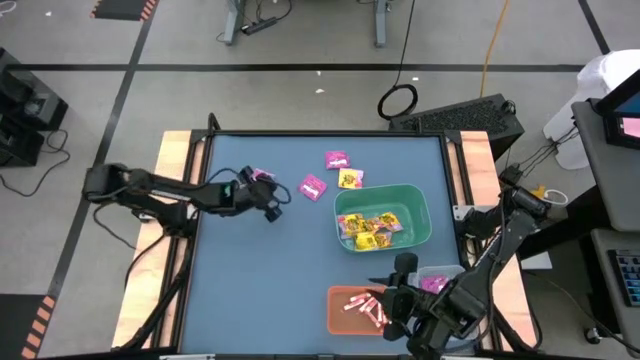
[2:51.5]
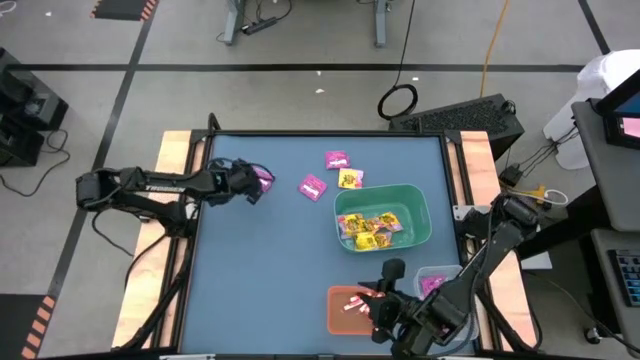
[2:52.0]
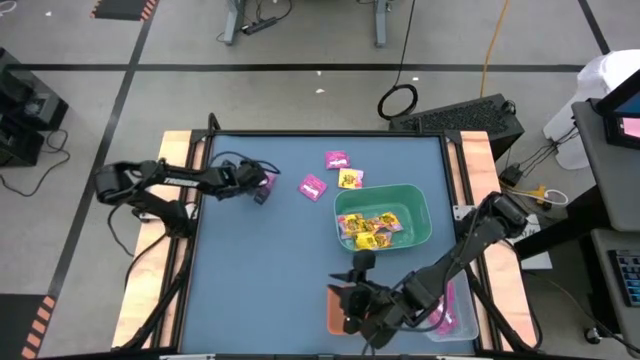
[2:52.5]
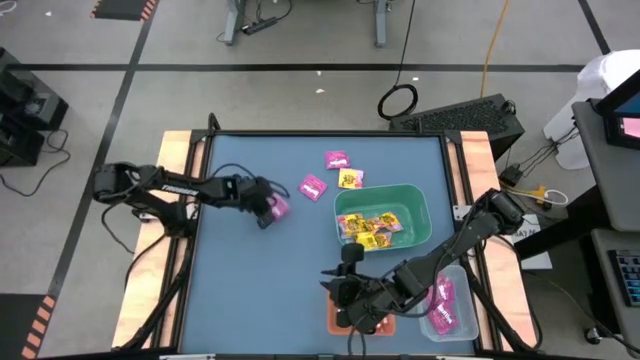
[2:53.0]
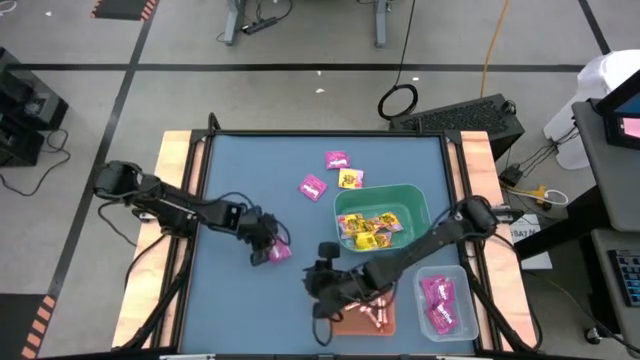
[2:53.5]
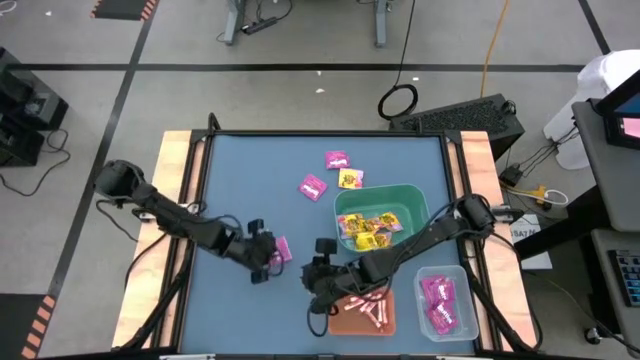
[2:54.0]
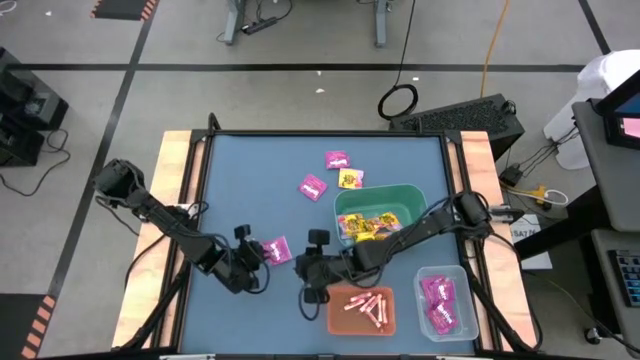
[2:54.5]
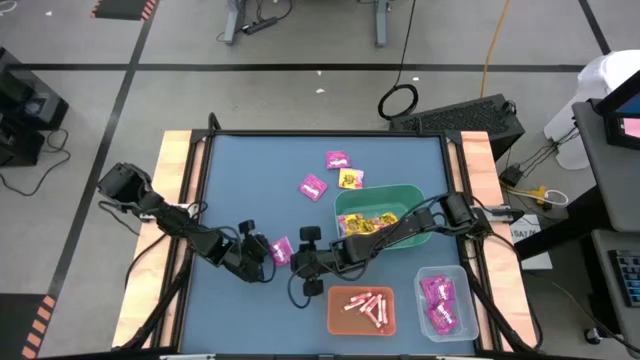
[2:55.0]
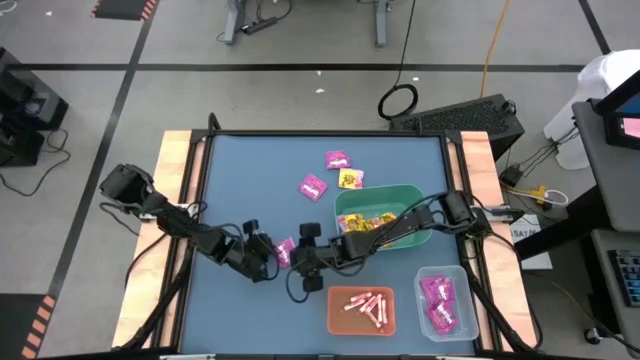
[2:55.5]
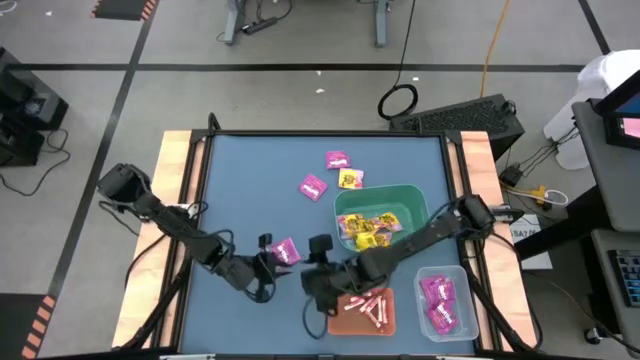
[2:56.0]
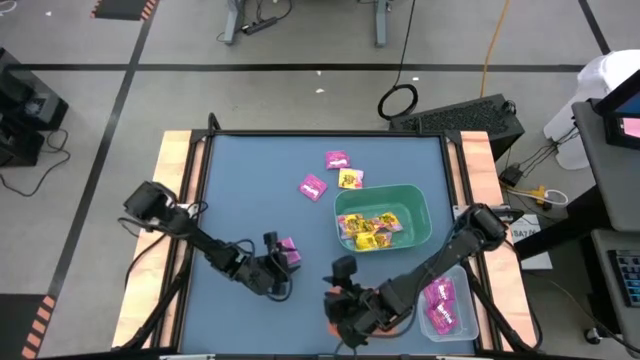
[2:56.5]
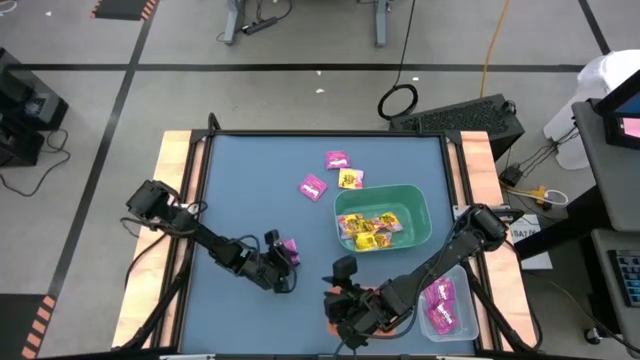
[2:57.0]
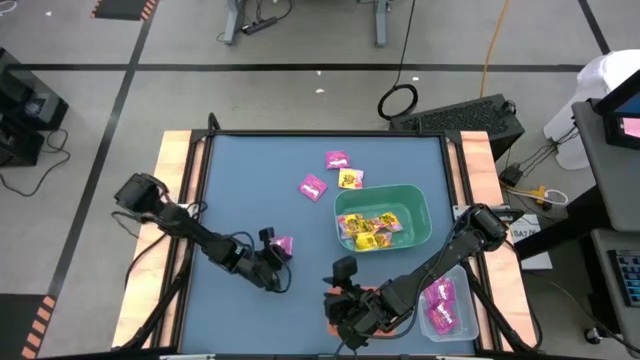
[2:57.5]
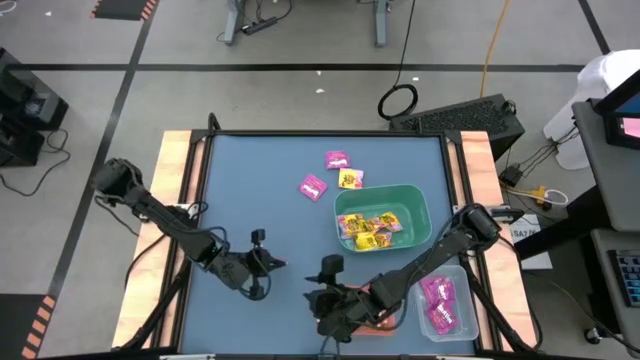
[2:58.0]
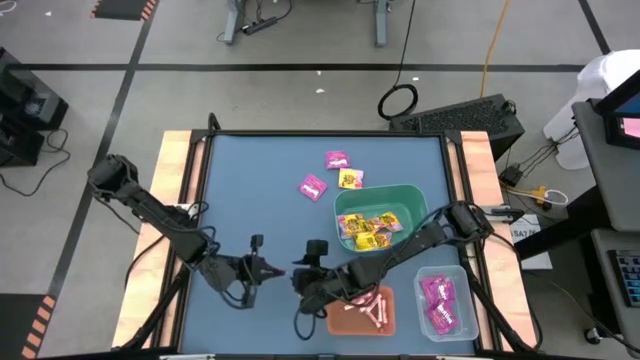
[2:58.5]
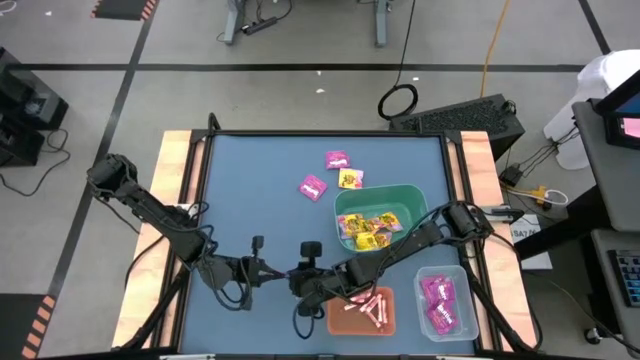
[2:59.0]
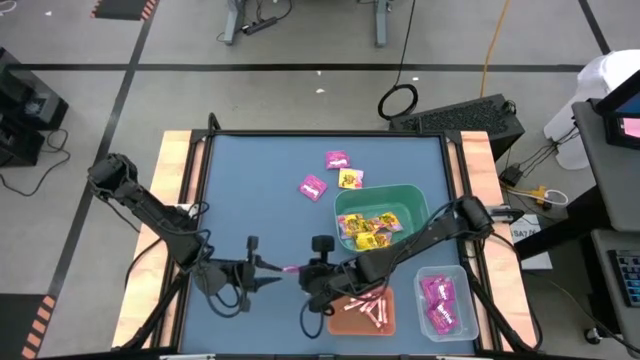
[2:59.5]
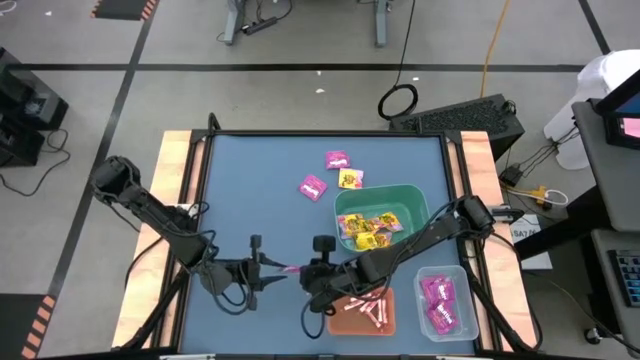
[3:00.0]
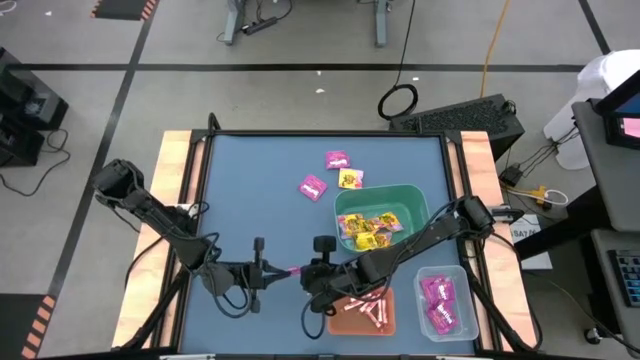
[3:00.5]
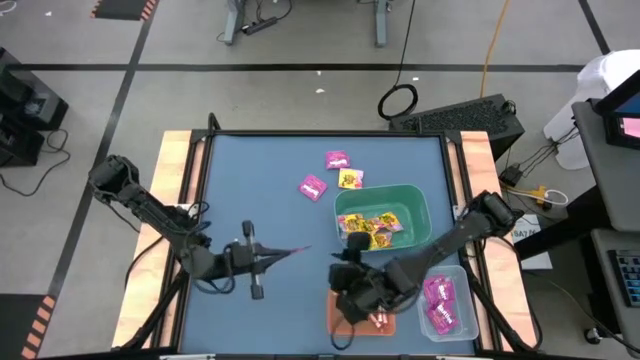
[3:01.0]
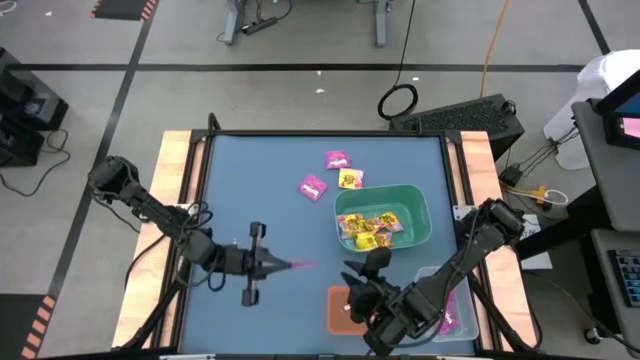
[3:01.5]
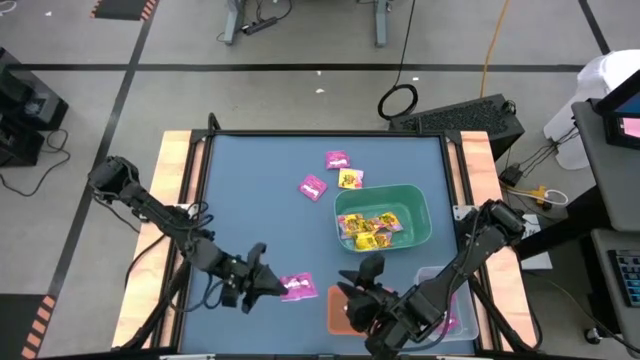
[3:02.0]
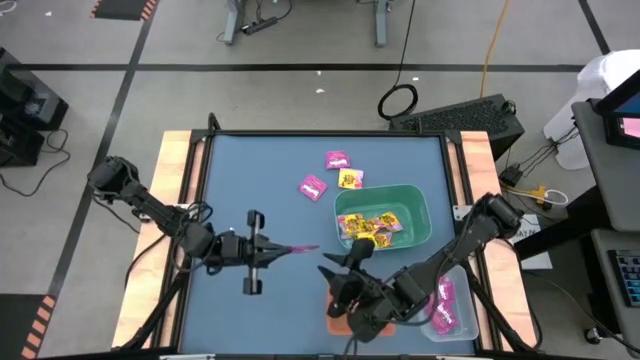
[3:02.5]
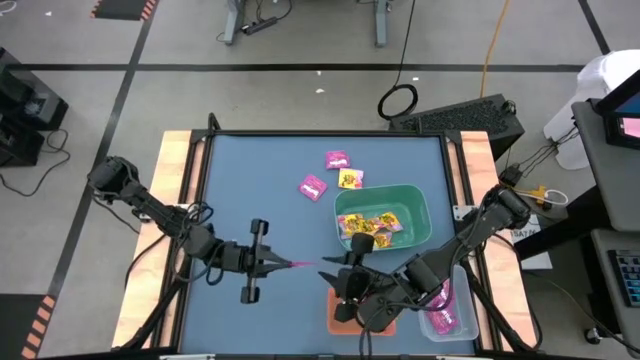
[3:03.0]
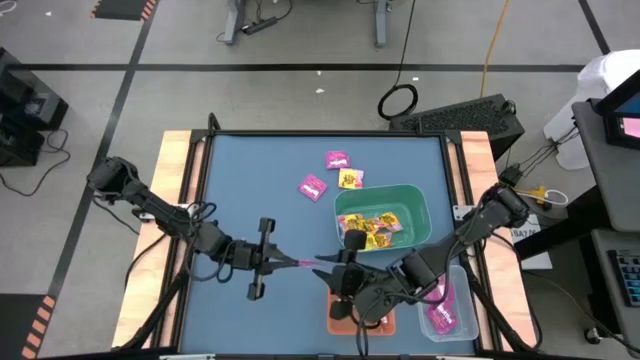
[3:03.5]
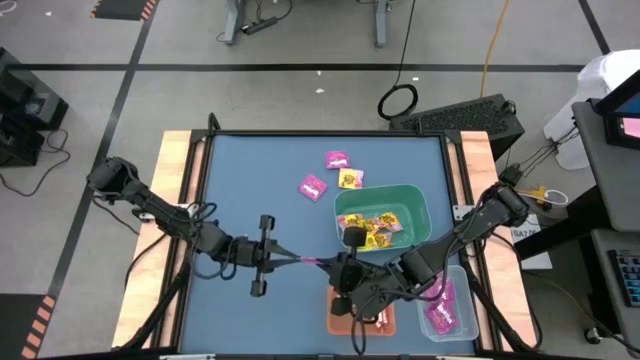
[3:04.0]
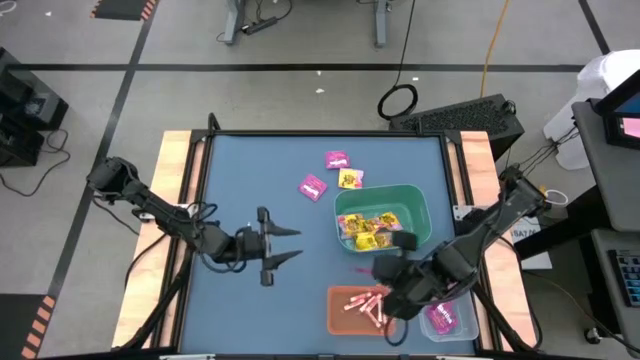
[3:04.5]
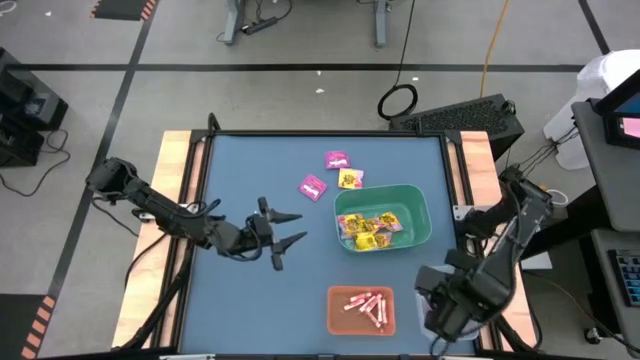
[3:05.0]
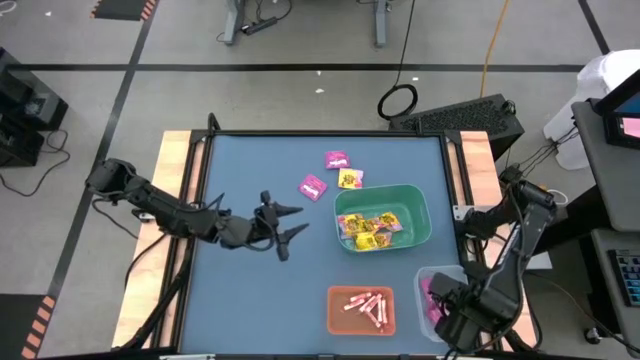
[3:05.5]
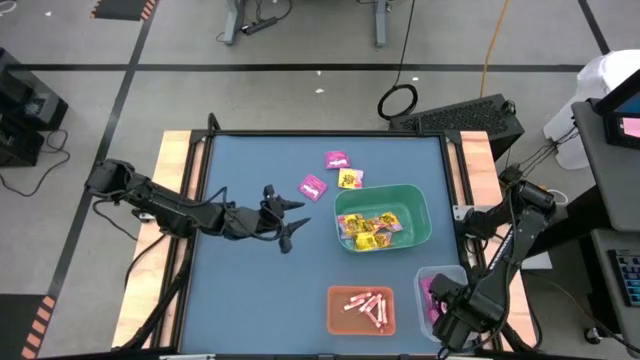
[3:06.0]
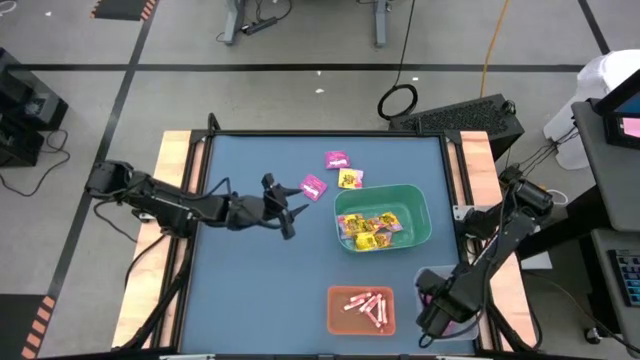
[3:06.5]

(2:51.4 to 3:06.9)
Task: Sort candy
Put the purple candy pack into the transparent bin

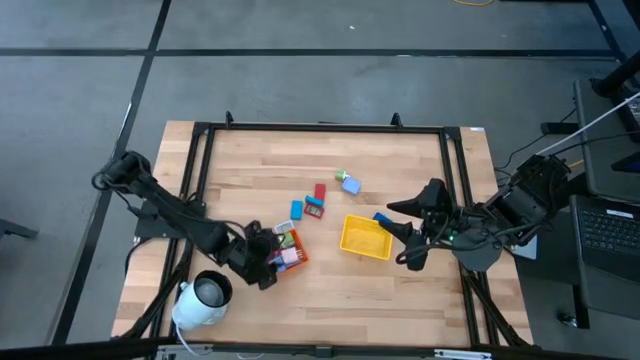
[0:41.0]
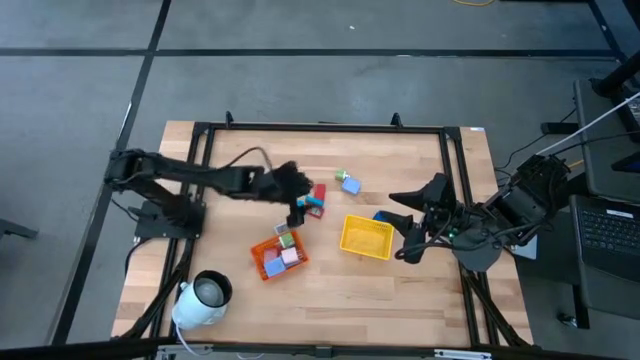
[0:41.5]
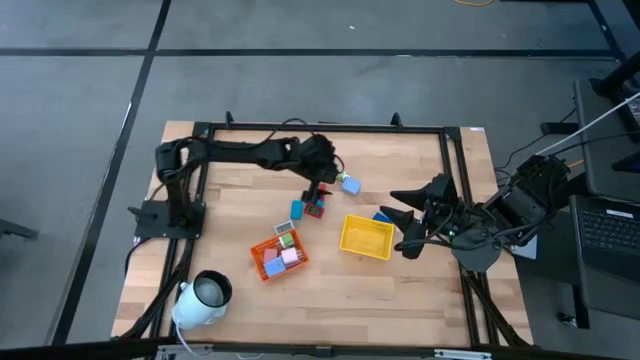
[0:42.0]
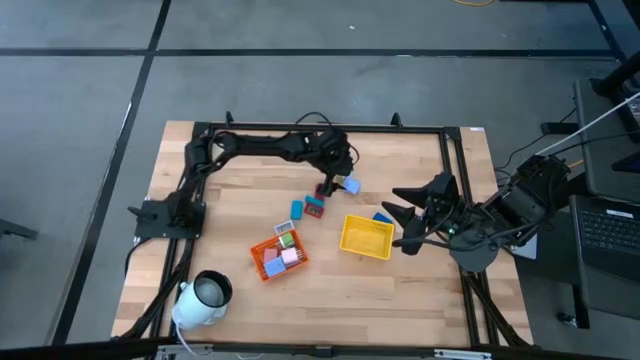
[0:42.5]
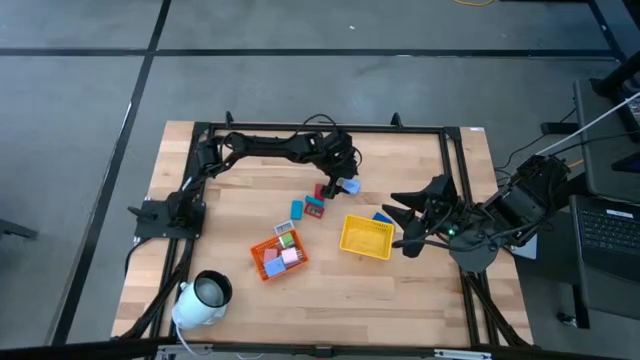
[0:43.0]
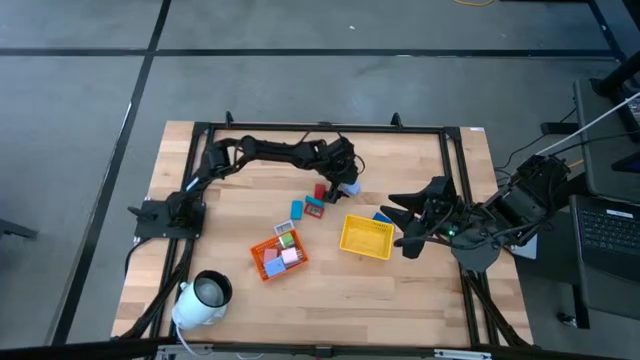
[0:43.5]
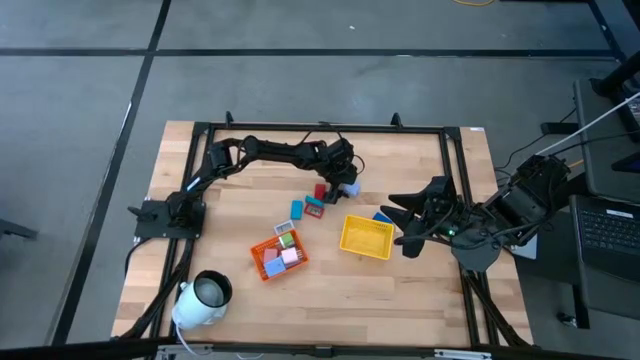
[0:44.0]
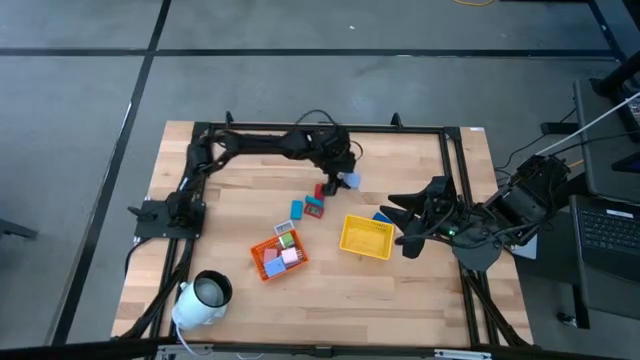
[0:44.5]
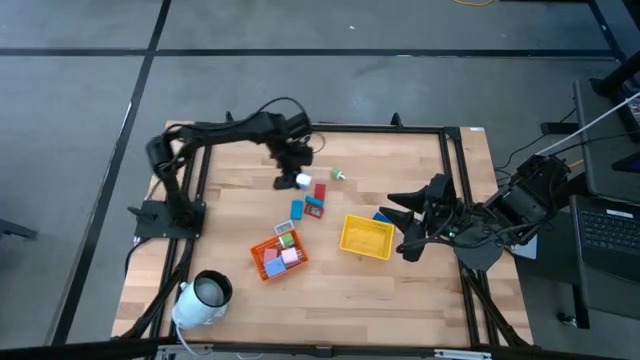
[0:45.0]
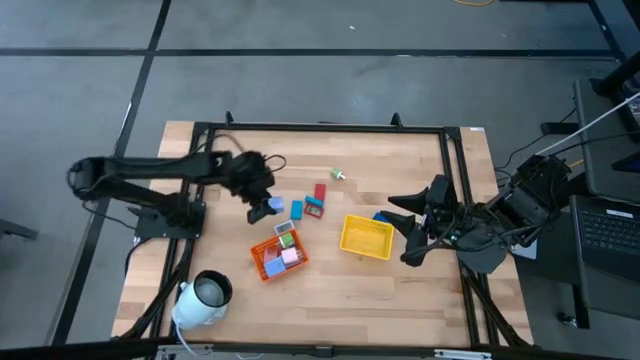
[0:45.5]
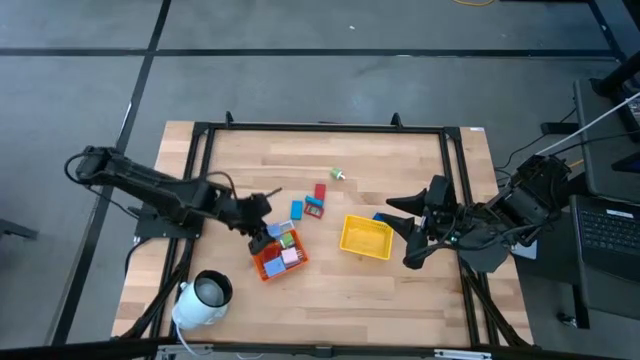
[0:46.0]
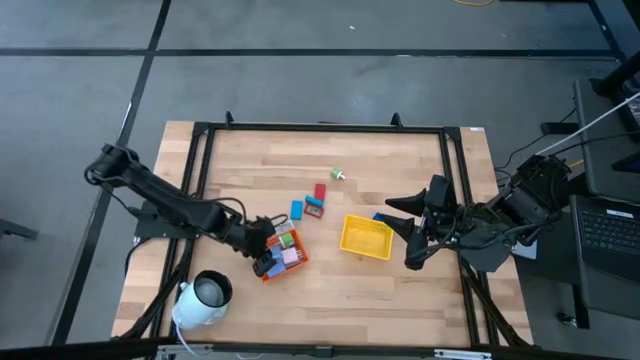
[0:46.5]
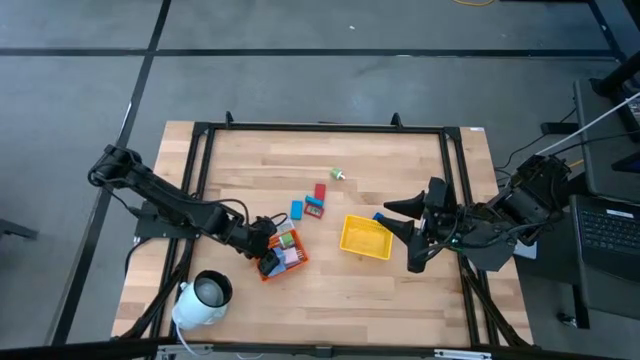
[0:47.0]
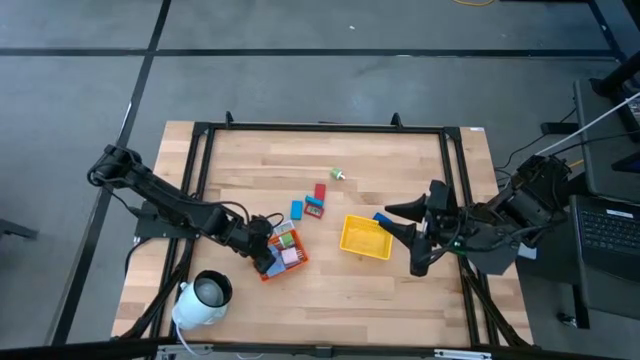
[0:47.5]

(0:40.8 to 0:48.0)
Task: Pick & Place Office items
Put the light violet charger adapter into the orange bin
